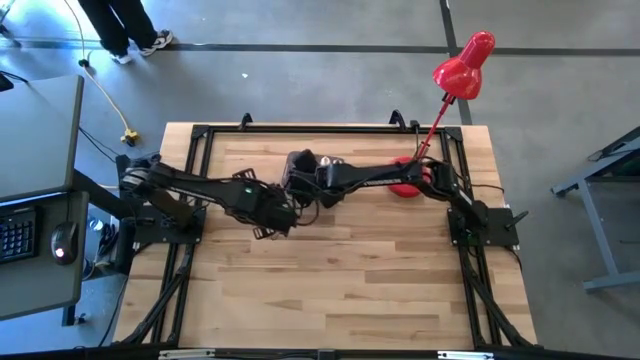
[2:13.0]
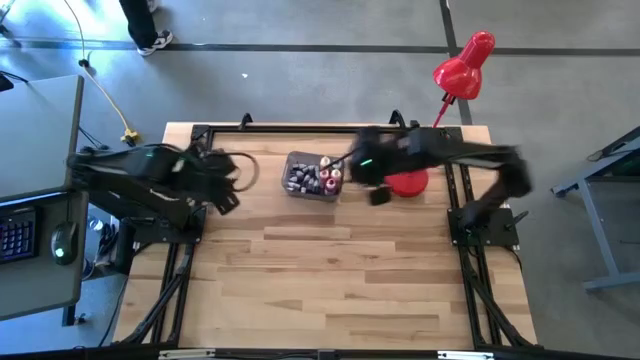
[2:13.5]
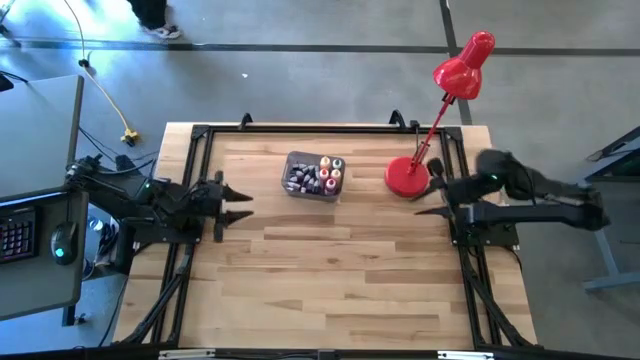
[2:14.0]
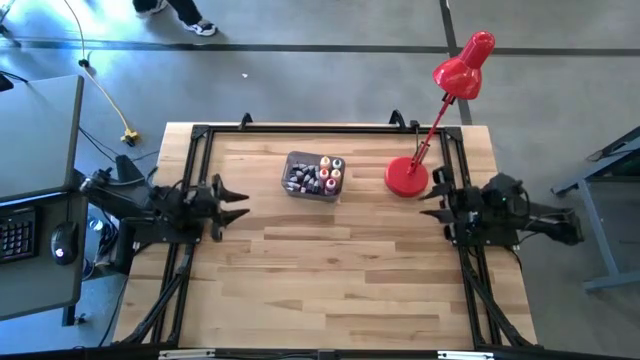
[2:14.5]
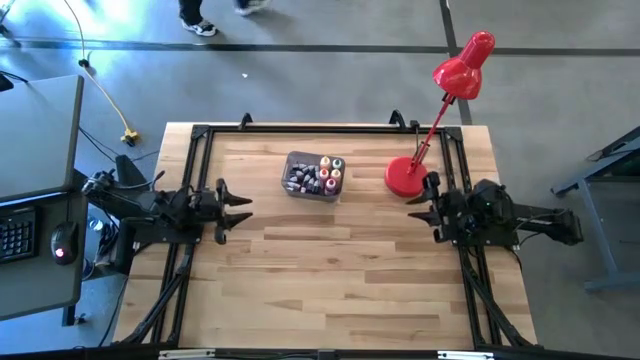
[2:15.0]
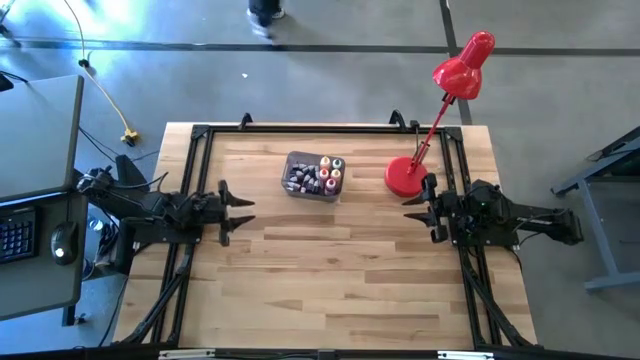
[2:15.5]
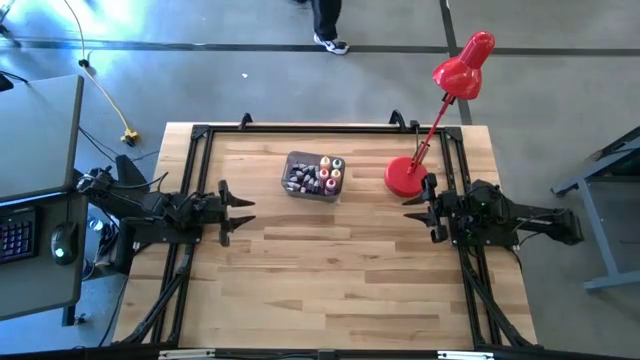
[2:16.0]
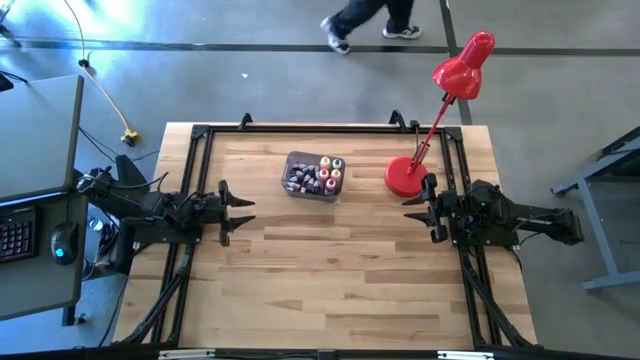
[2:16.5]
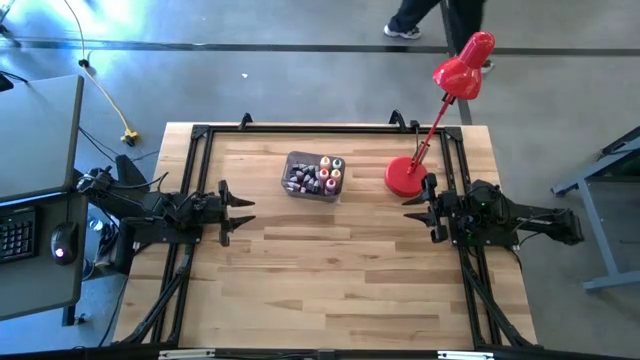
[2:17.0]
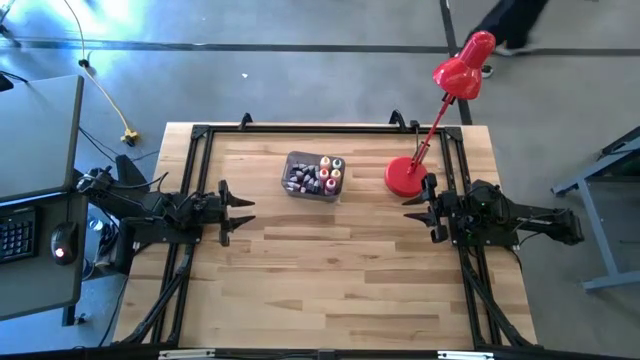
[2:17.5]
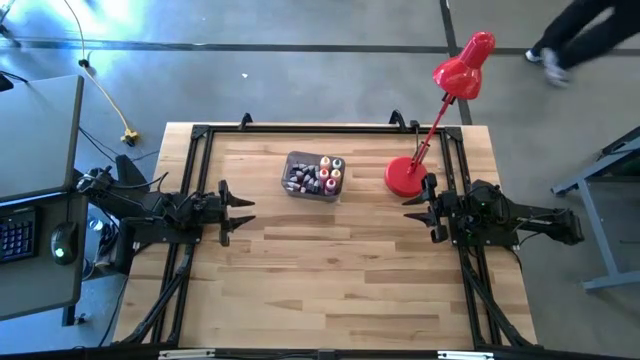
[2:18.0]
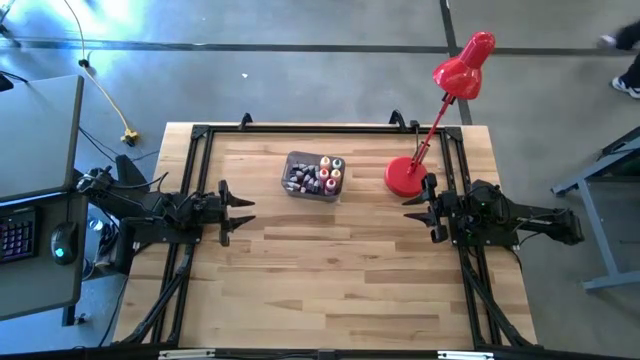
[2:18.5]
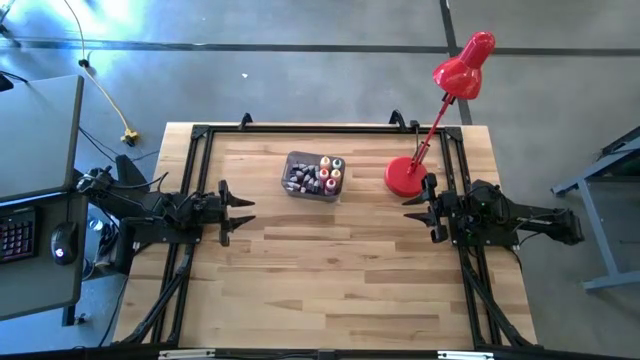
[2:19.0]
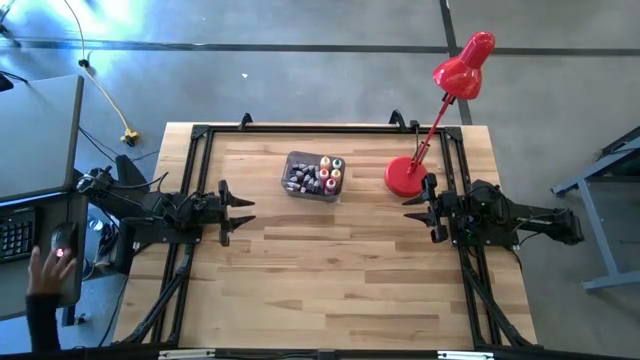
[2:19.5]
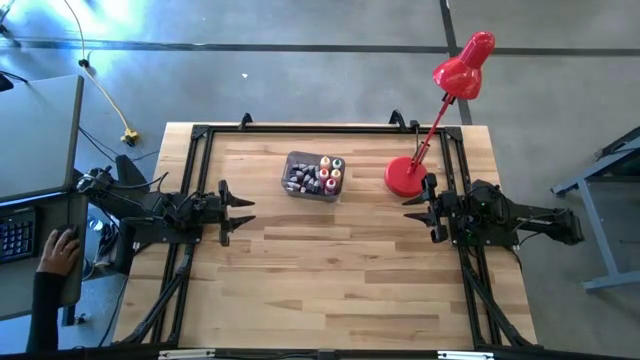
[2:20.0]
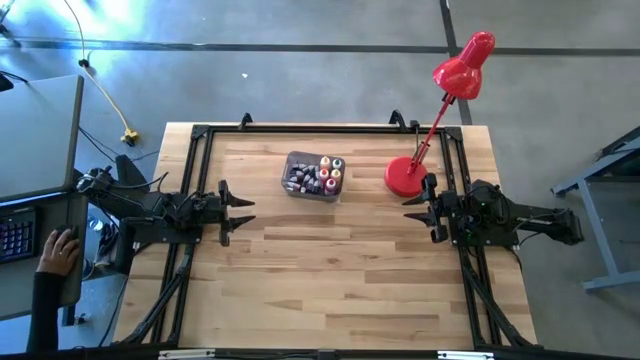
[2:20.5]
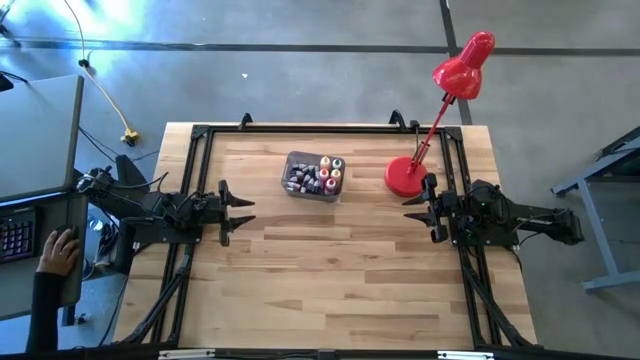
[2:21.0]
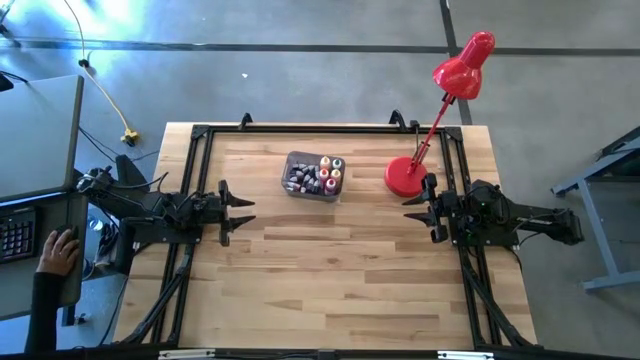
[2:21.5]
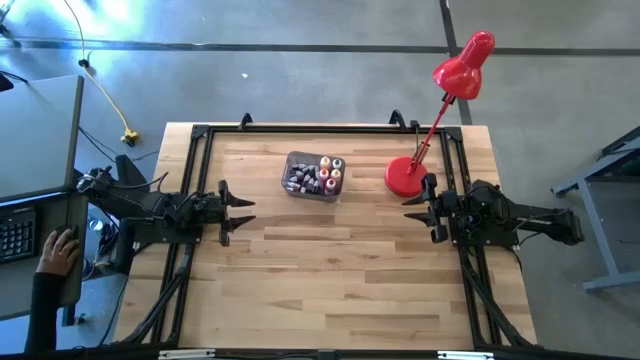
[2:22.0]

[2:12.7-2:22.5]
Task: Pick & Place food coloring
Return to Home Position

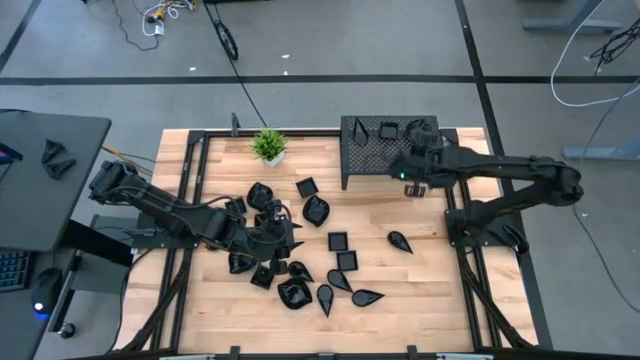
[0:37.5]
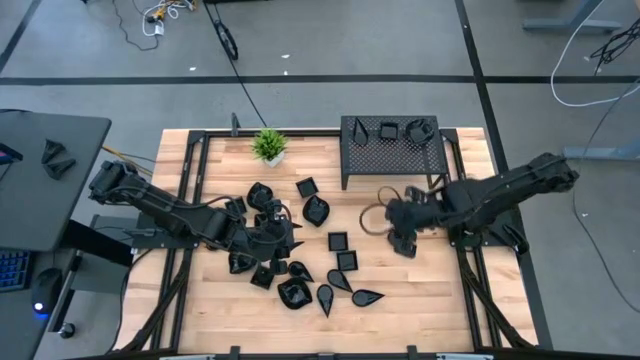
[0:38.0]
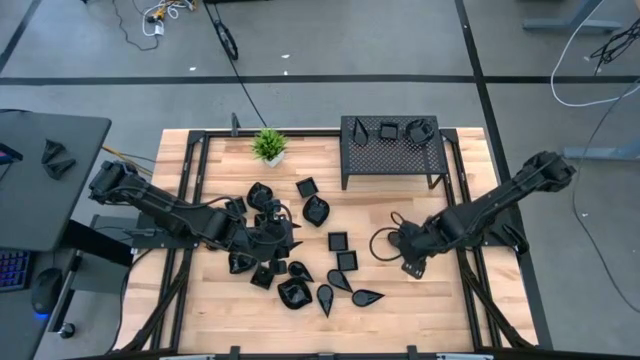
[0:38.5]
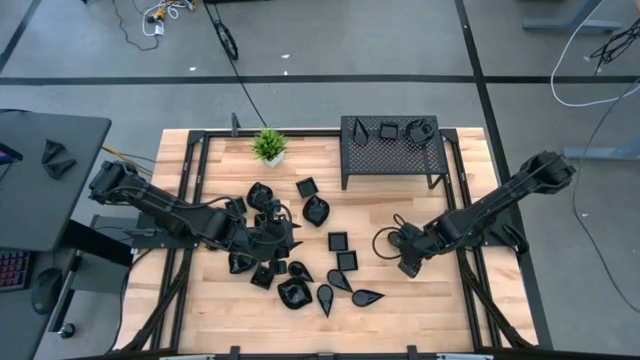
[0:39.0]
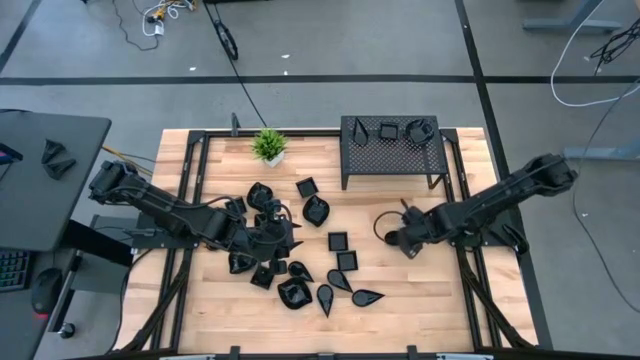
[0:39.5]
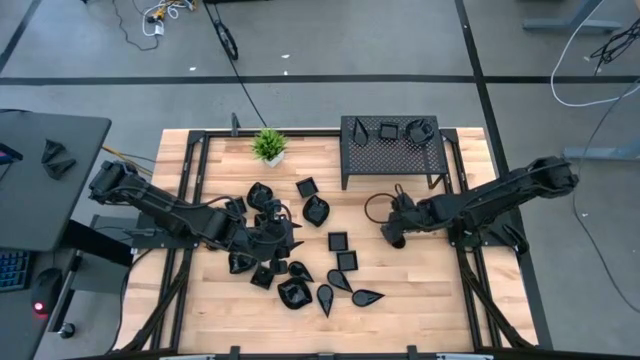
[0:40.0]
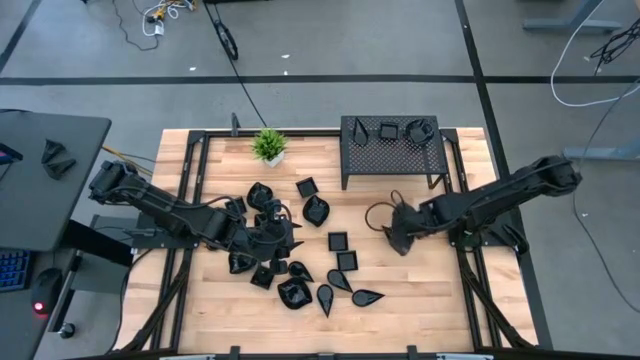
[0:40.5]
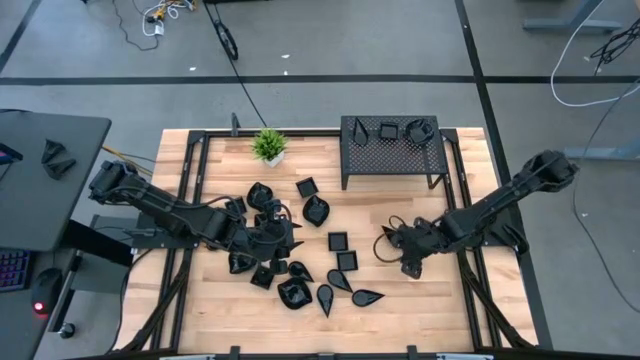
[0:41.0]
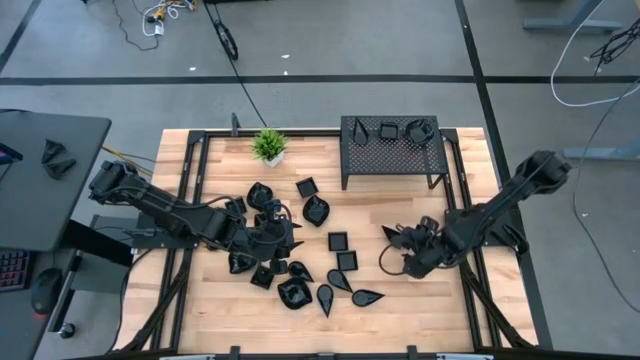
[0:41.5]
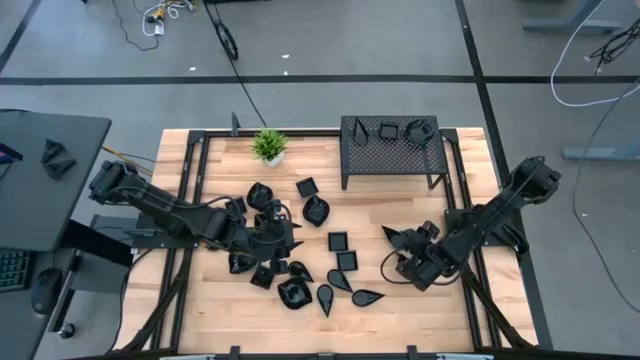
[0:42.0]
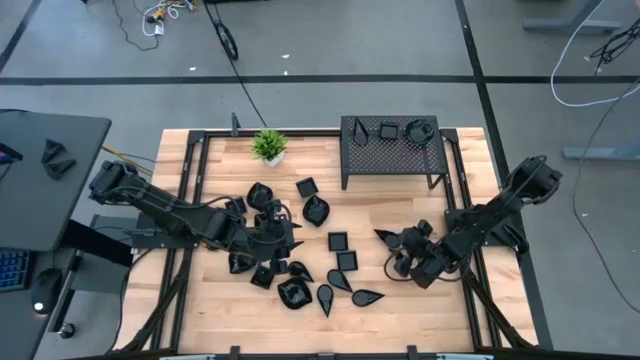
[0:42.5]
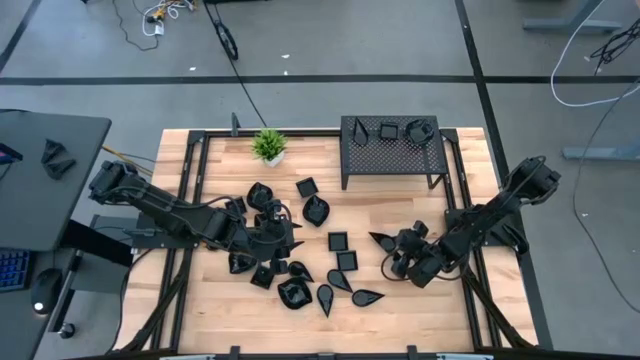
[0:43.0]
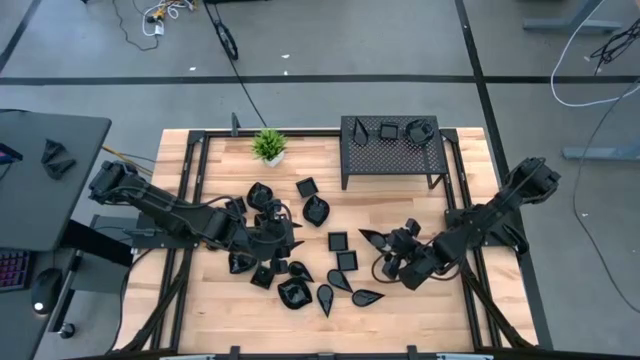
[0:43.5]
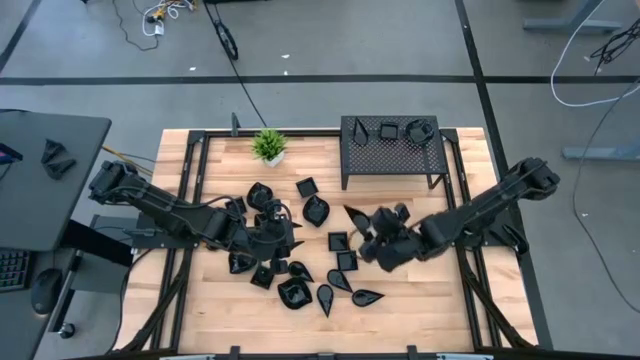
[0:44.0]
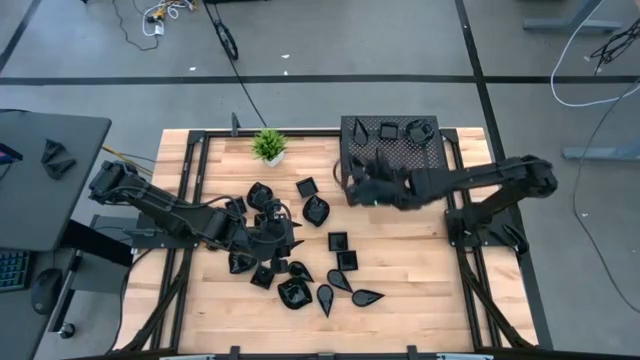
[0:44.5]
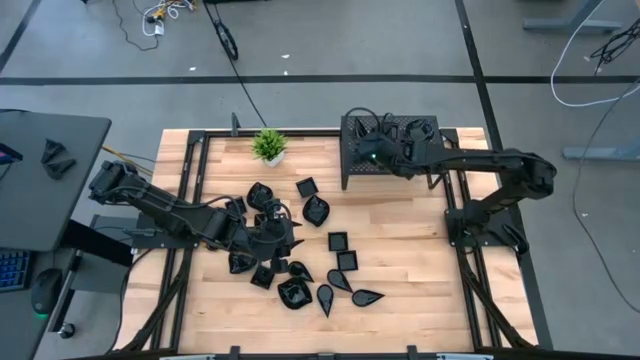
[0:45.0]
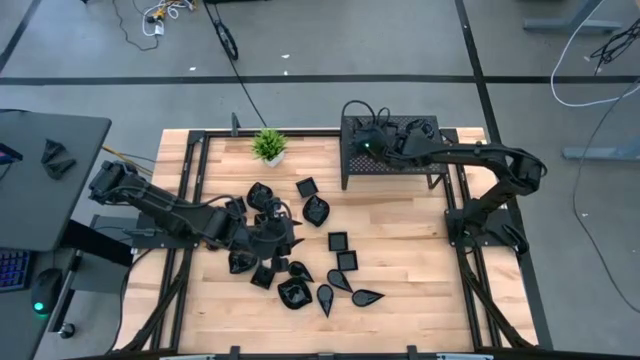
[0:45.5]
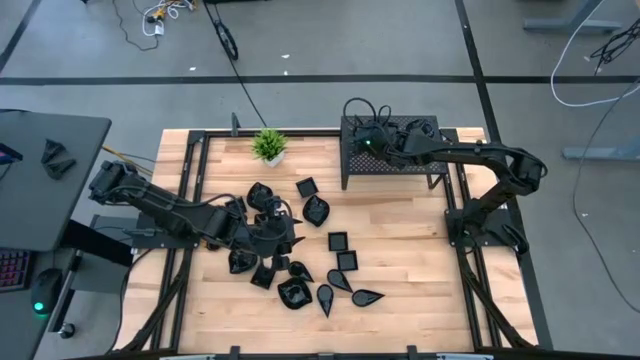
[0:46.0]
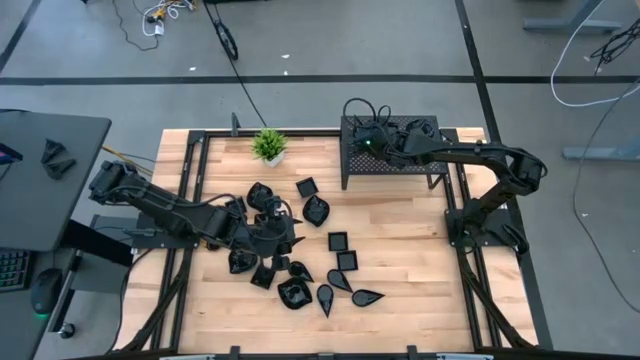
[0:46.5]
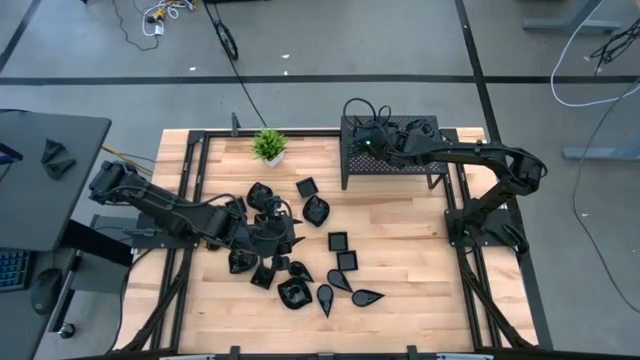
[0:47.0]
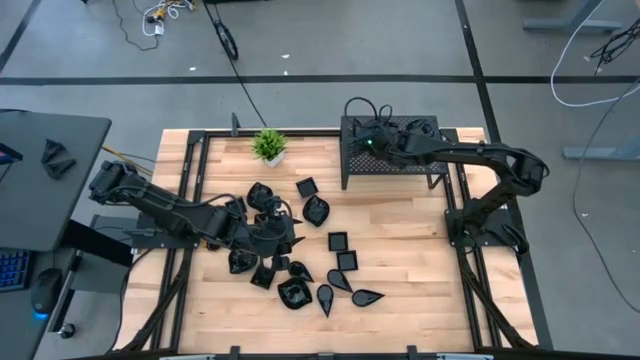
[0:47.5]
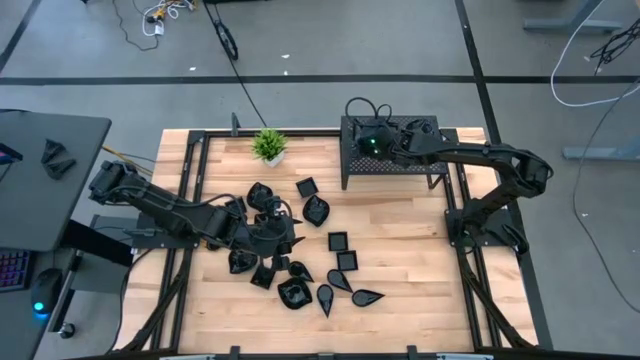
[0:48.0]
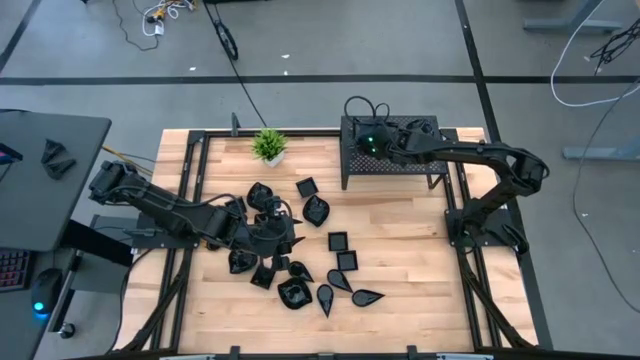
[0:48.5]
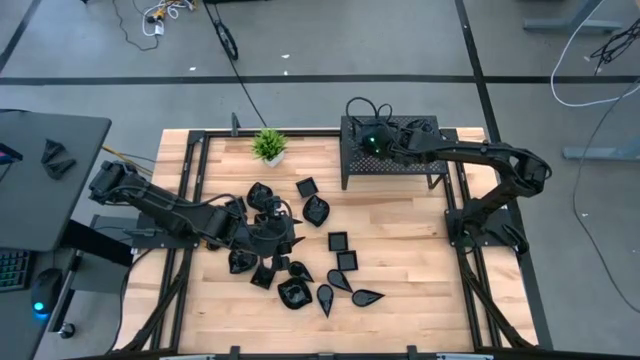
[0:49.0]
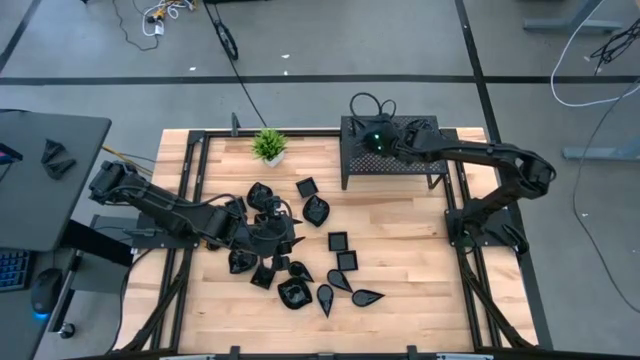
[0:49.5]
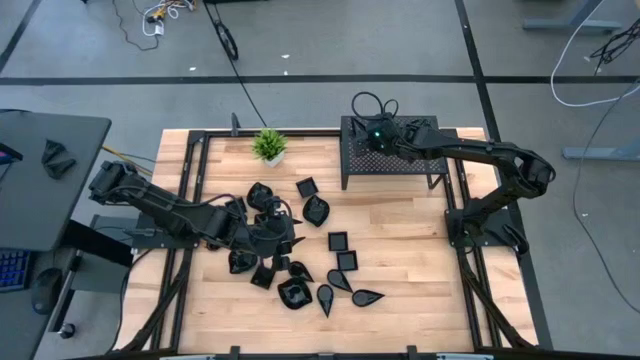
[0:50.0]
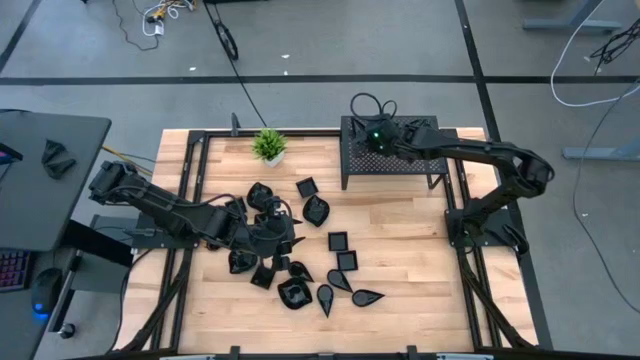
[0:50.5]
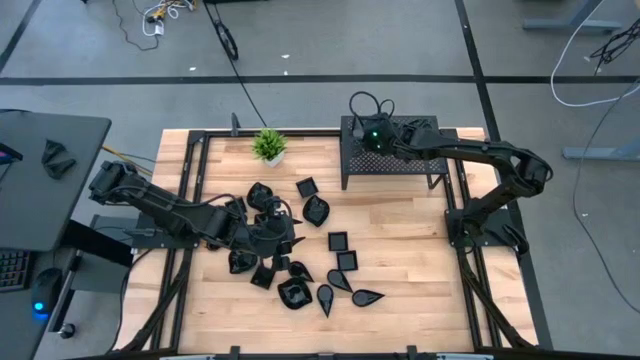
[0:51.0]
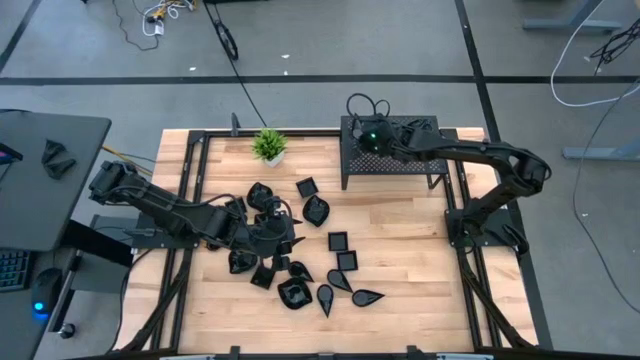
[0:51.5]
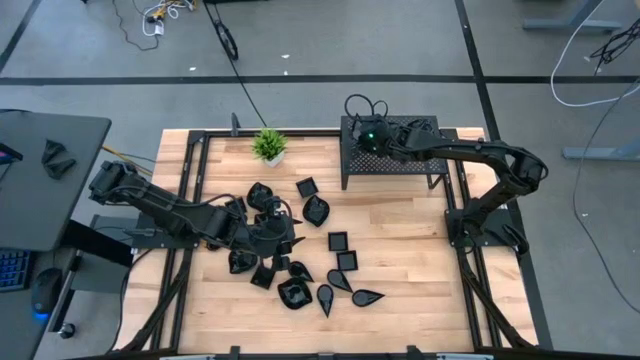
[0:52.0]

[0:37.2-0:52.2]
Task: Pick & Place Mini shaped plates
Stack the black drop-shaped plate on top of the black drop-shaped plate on the shelf
